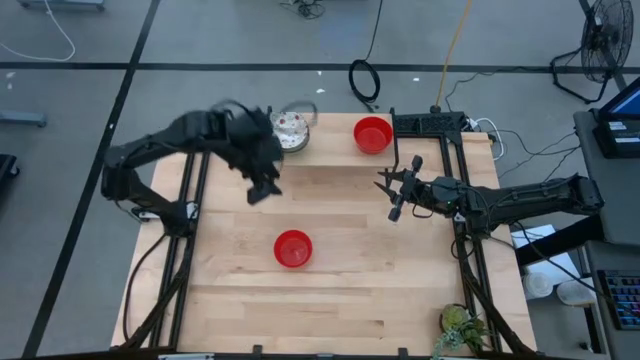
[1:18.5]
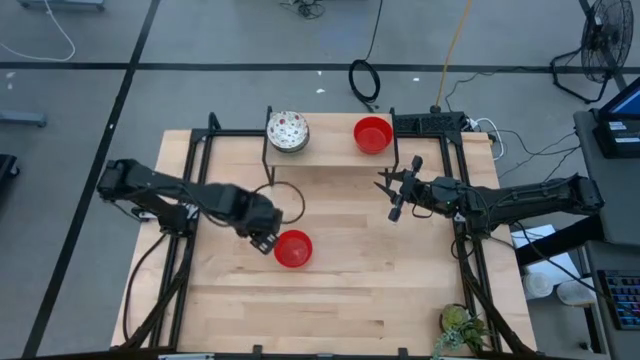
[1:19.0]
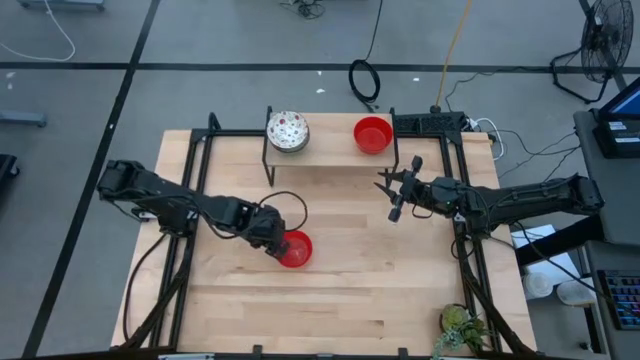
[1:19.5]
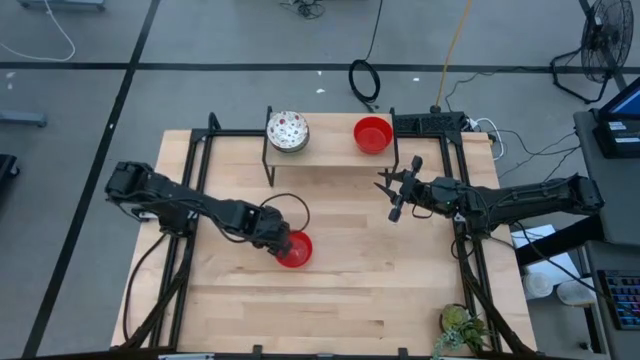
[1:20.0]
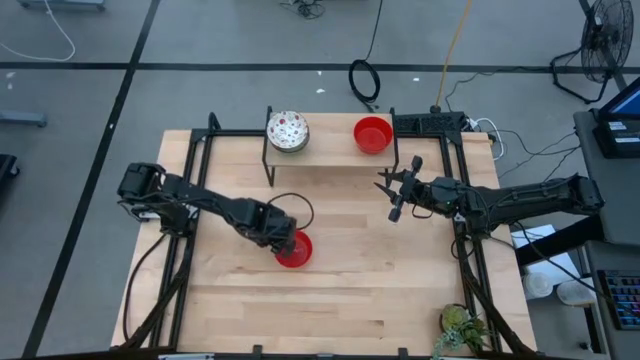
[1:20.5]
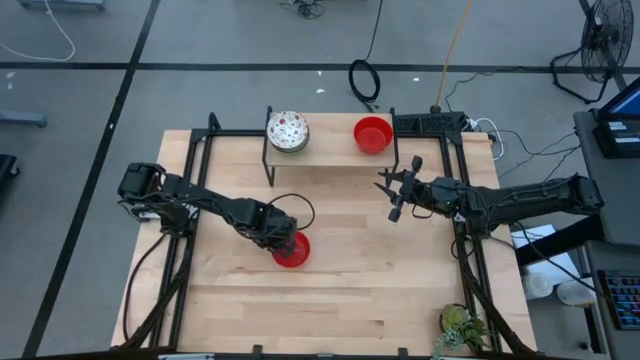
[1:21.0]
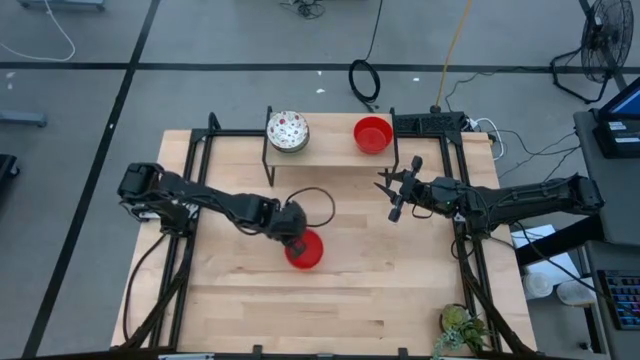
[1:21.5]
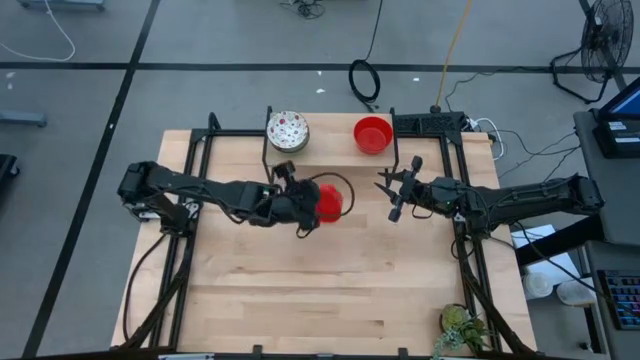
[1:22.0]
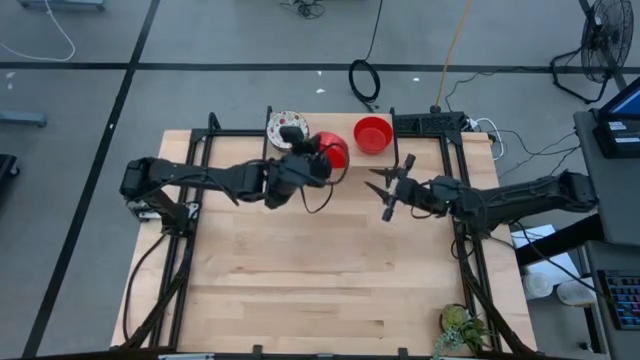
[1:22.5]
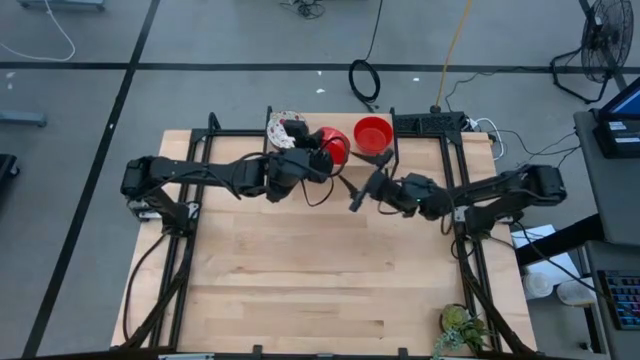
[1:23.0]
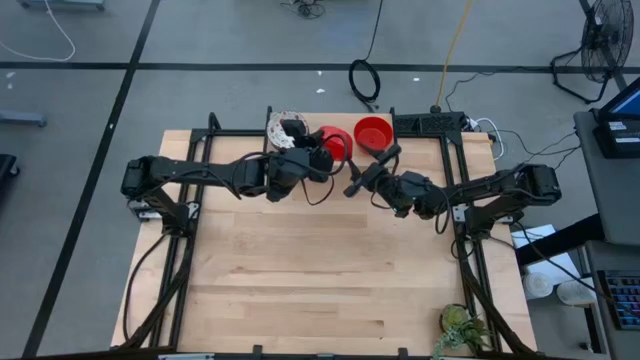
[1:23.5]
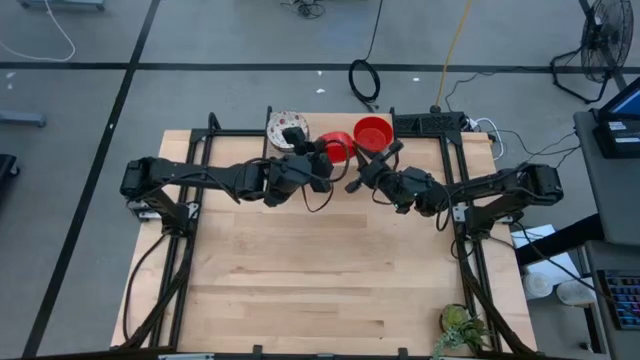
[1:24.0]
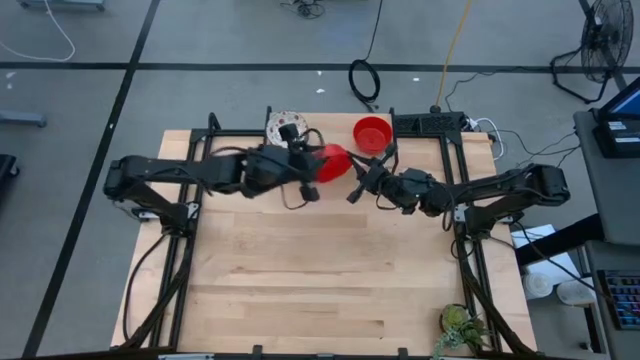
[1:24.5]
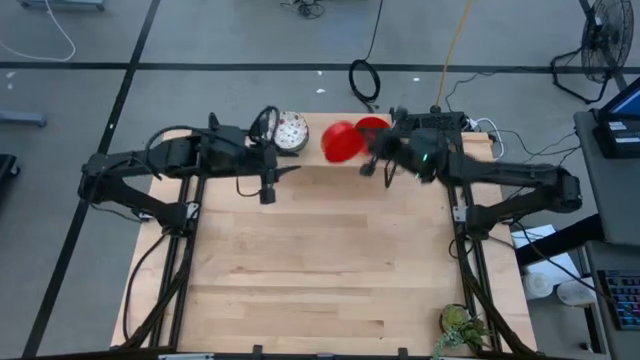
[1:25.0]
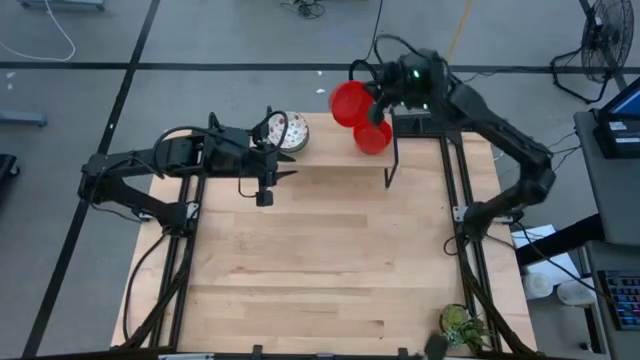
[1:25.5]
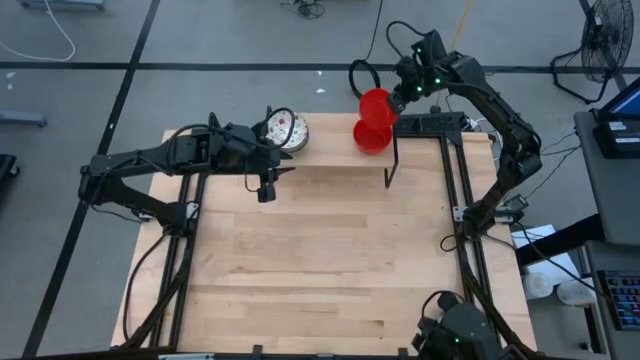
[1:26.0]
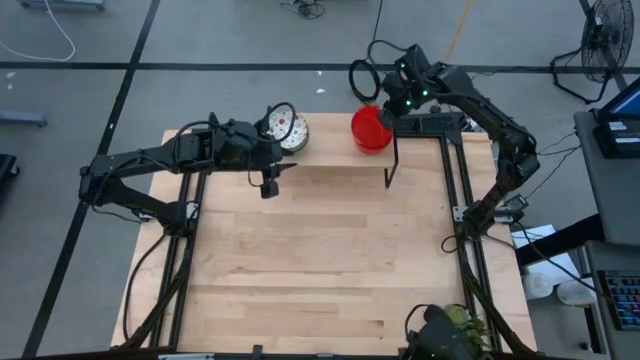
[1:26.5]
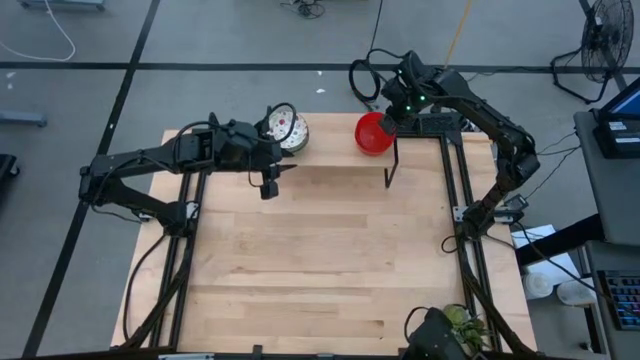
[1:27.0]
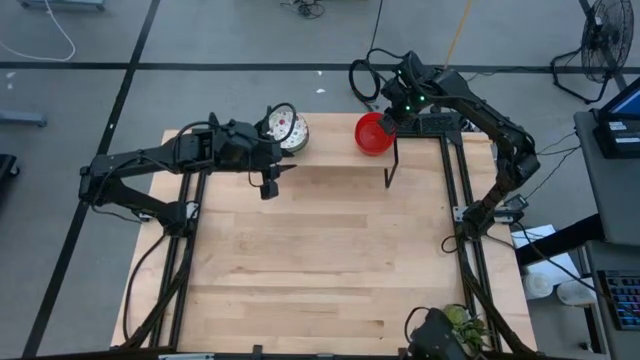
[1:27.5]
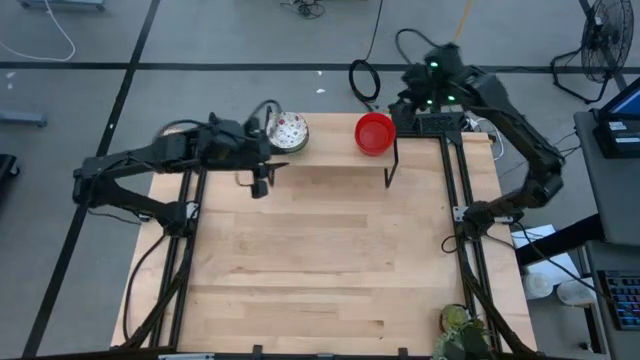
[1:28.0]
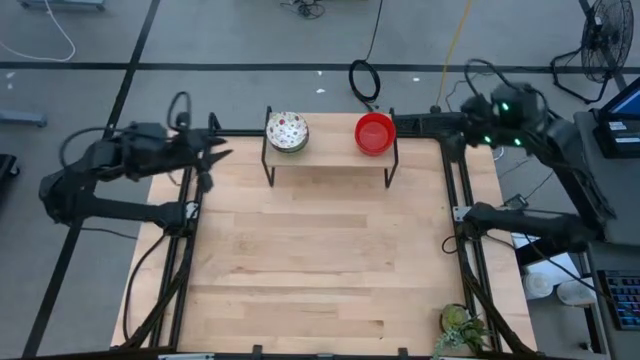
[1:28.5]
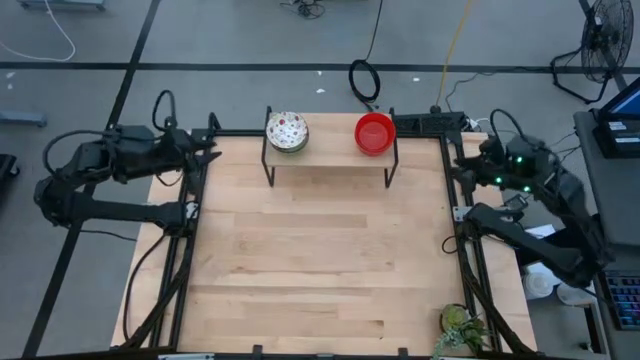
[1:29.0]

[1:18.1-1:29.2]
Task: Pick & Place Mini bowls
Stack the red bowl on the red bowls on the shelf

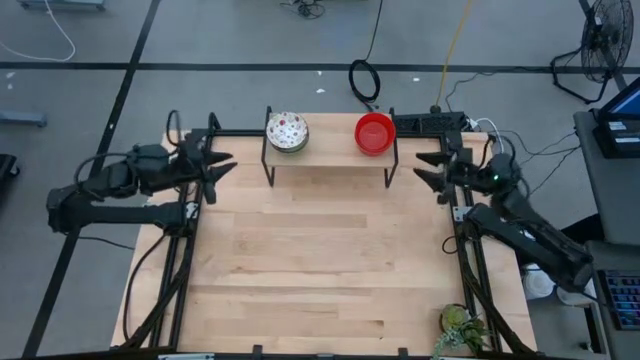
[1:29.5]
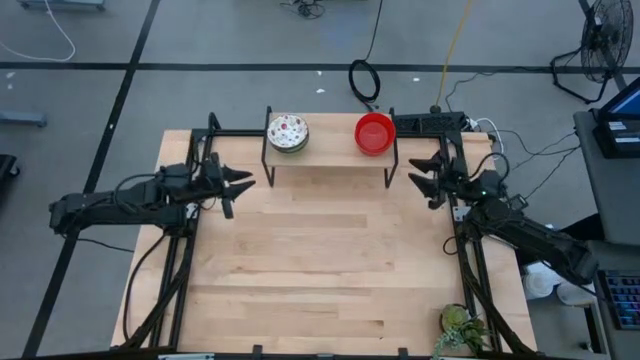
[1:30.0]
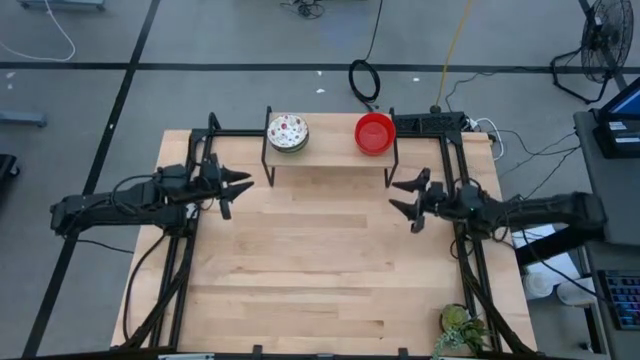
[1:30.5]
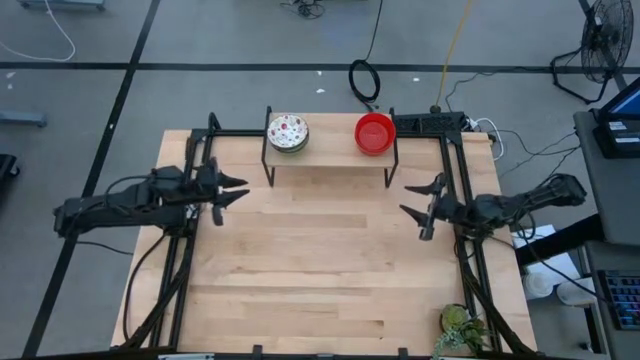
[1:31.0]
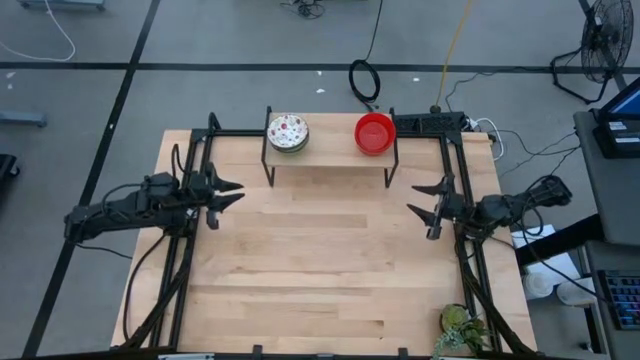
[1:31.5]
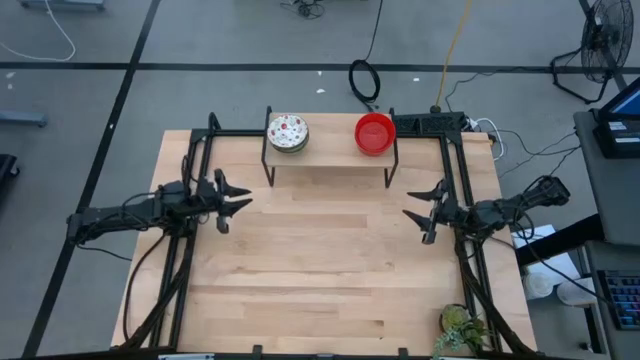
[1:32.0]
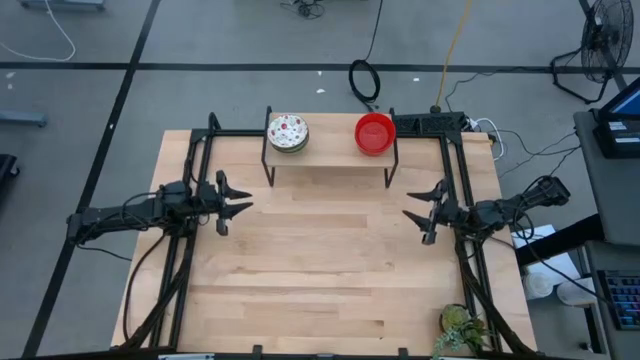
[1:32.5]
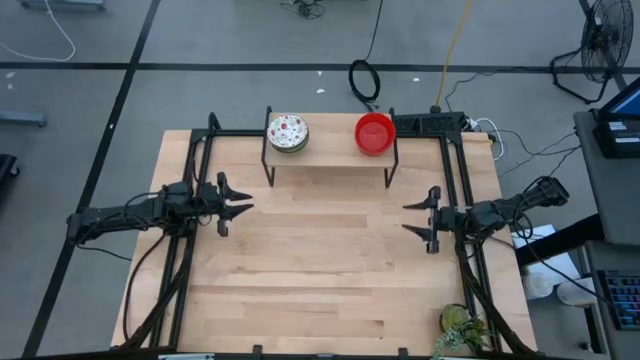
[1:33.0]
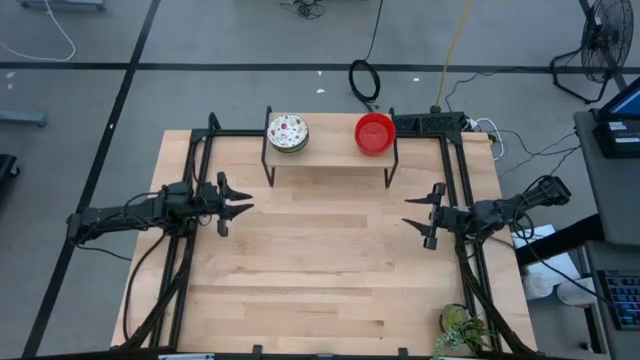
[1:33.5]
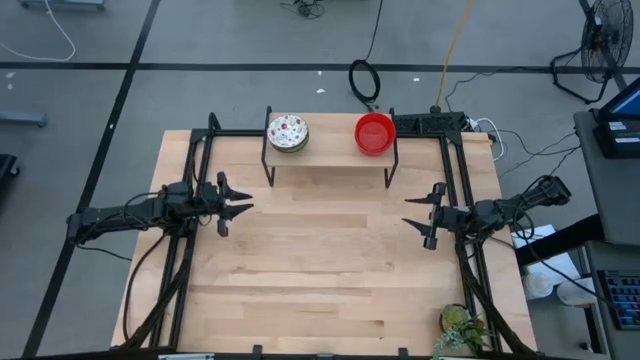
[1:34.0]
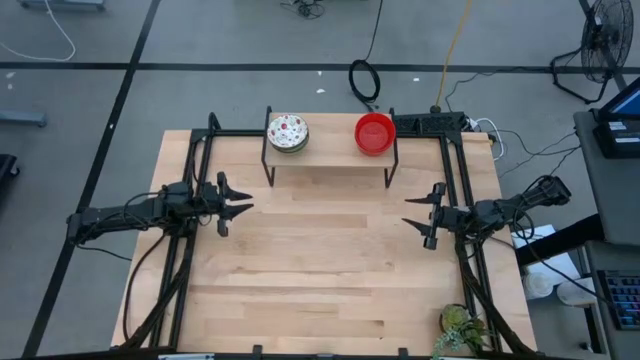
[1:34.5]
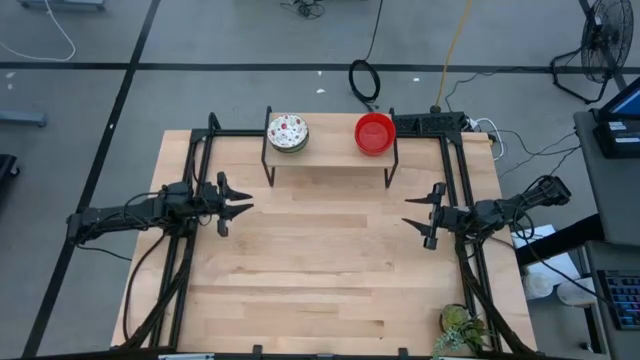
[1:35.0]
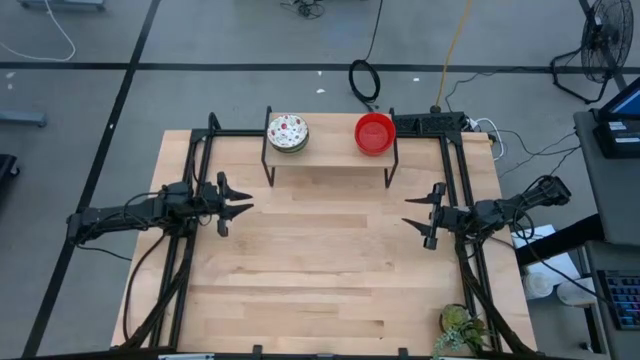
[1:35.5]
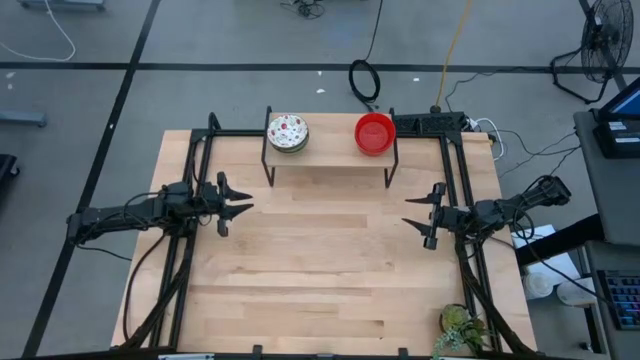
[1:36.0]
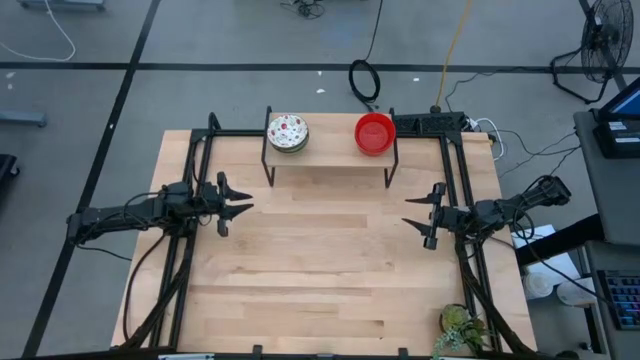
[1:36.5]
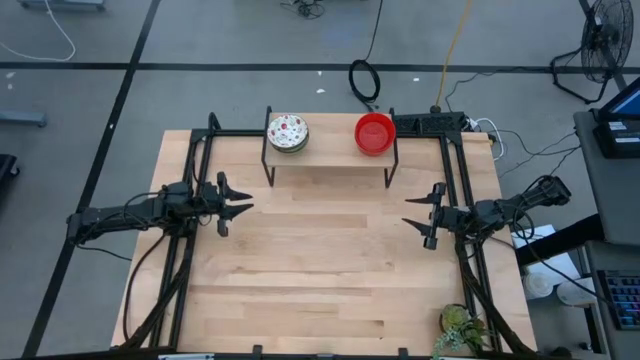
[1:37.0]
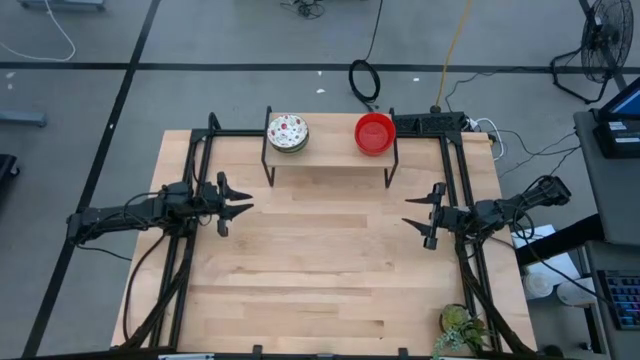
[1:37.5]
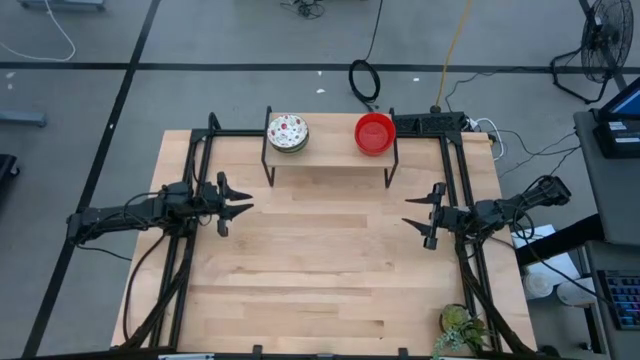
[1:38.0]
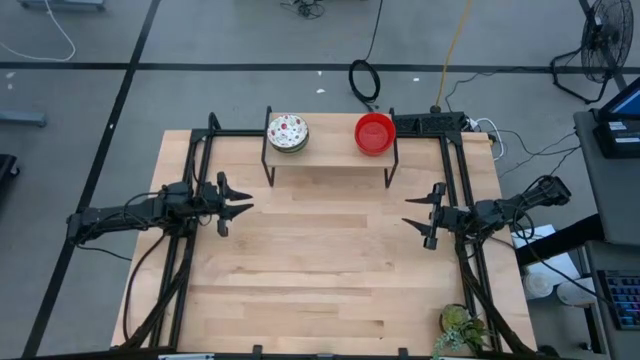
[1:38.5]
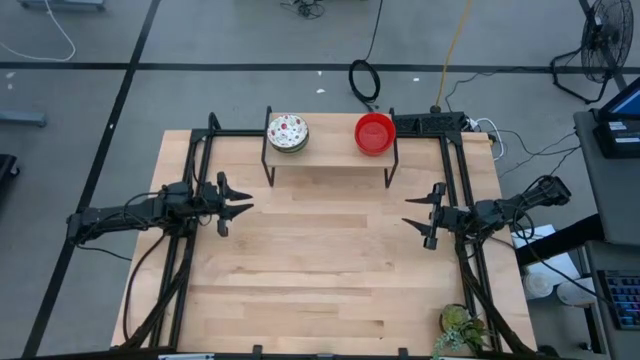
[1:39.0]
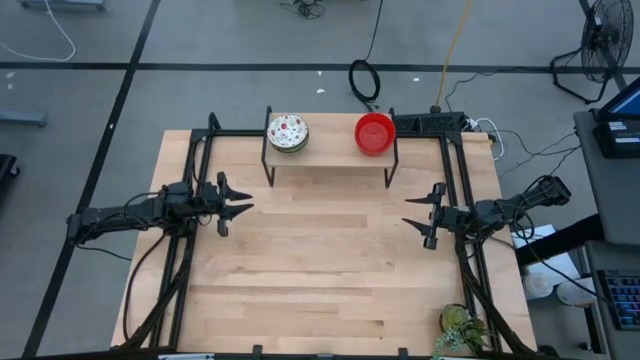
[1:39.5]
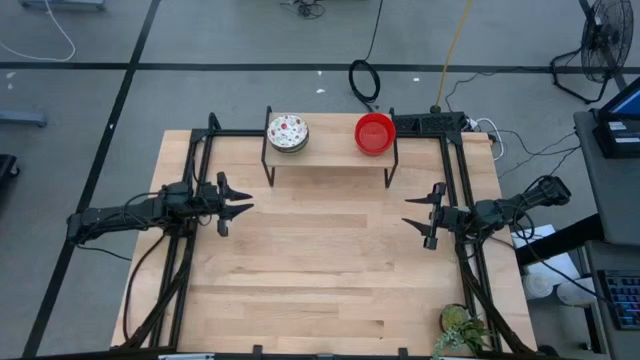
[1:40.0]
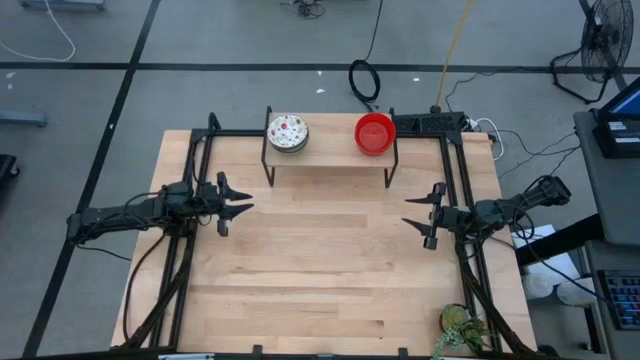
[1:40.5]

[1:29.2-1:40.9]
Return to home position
